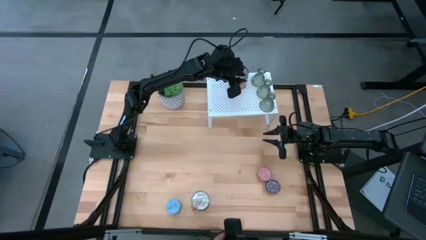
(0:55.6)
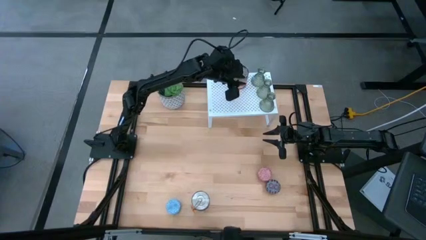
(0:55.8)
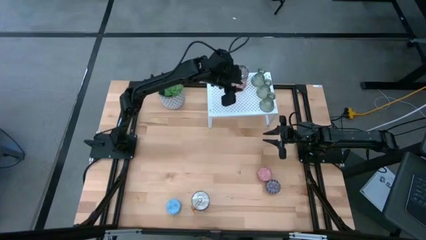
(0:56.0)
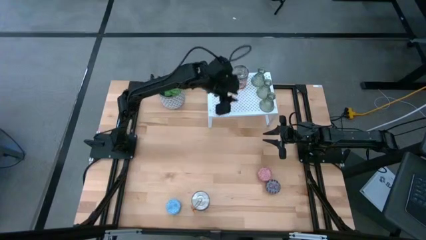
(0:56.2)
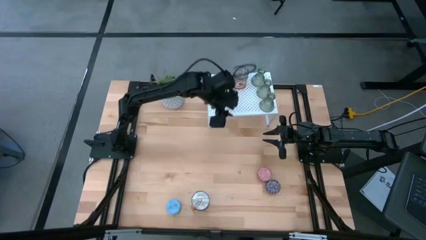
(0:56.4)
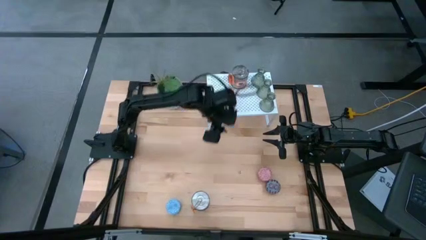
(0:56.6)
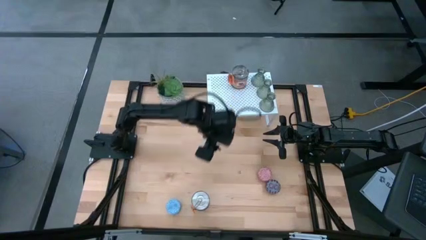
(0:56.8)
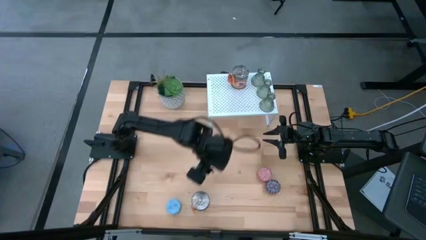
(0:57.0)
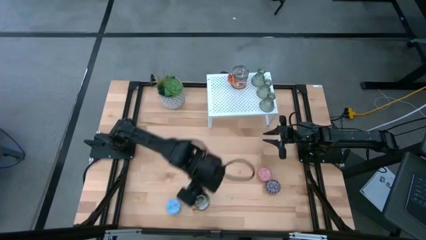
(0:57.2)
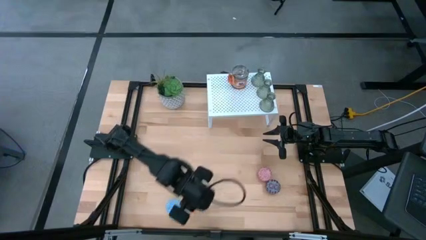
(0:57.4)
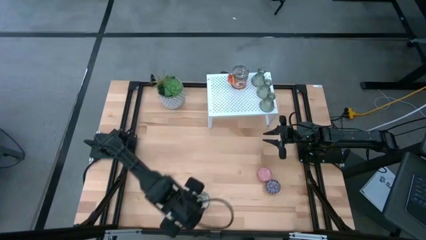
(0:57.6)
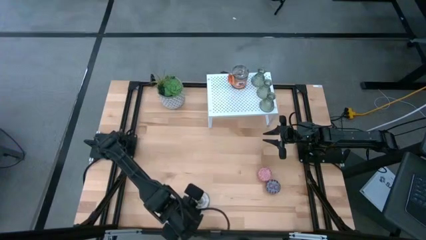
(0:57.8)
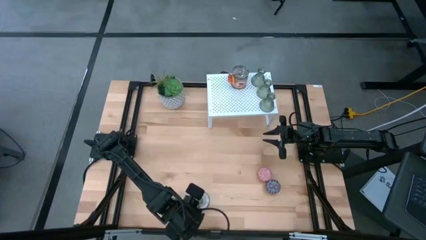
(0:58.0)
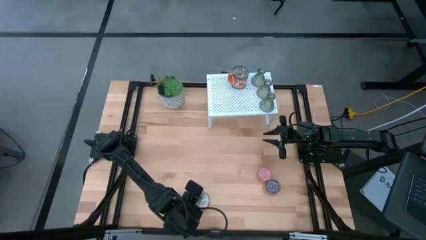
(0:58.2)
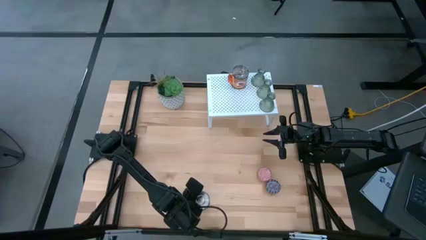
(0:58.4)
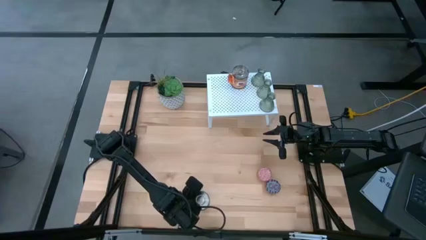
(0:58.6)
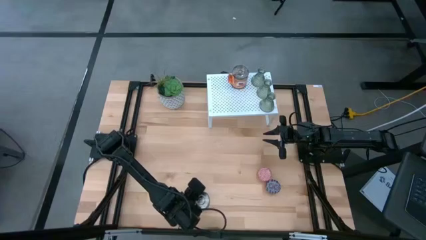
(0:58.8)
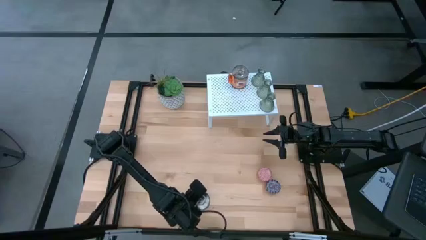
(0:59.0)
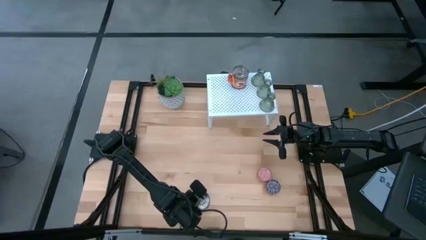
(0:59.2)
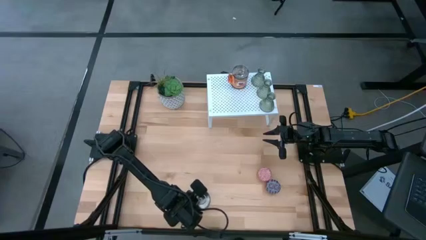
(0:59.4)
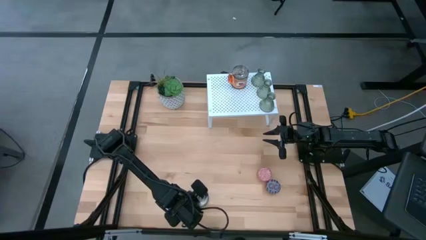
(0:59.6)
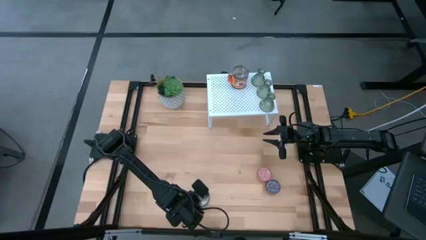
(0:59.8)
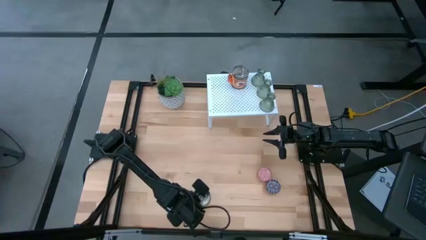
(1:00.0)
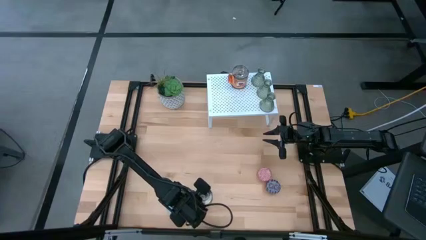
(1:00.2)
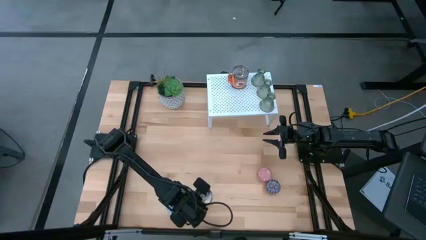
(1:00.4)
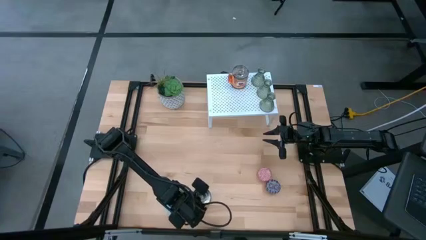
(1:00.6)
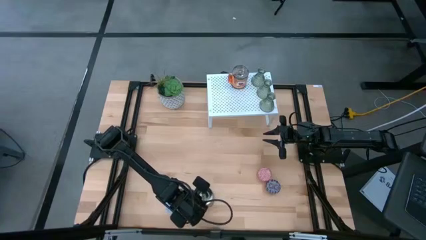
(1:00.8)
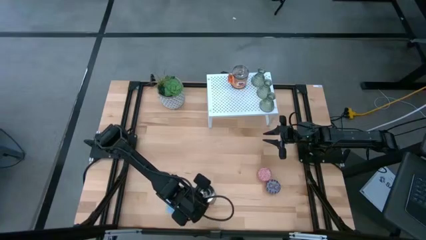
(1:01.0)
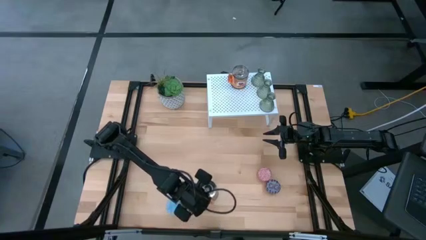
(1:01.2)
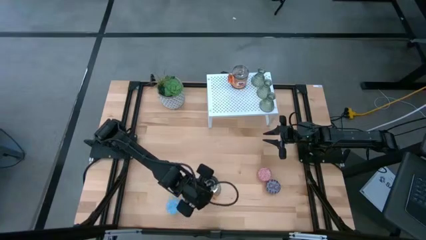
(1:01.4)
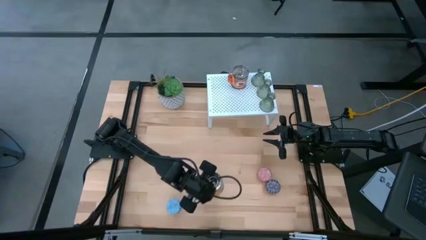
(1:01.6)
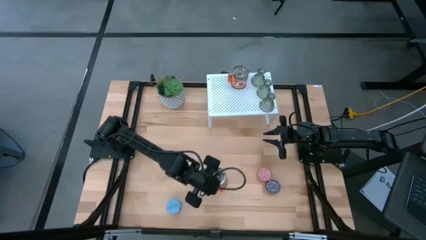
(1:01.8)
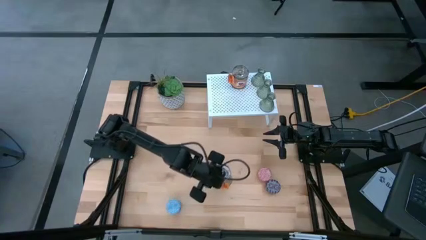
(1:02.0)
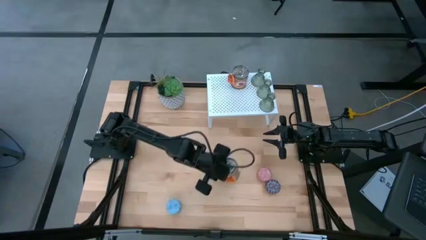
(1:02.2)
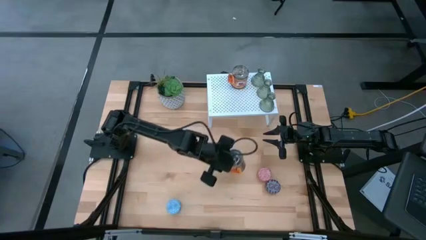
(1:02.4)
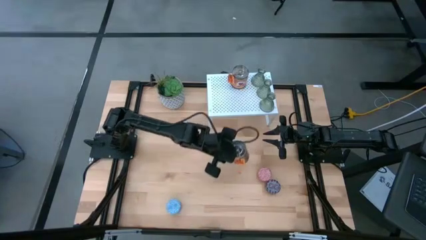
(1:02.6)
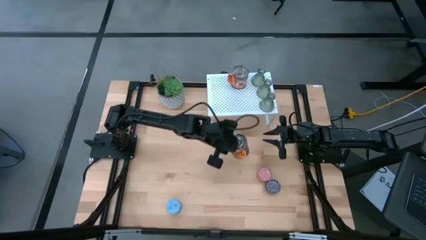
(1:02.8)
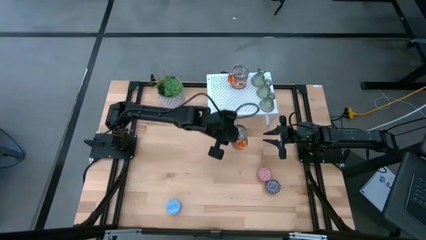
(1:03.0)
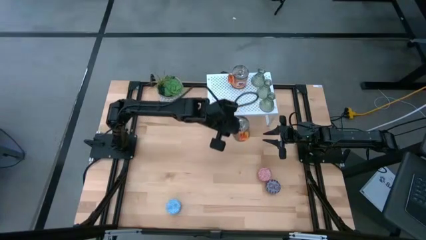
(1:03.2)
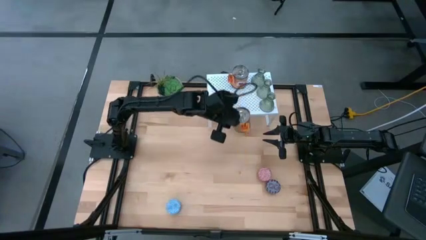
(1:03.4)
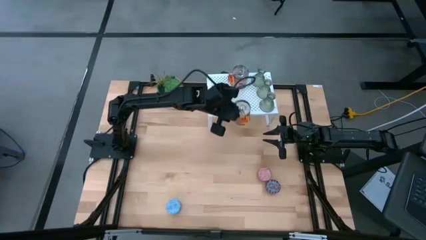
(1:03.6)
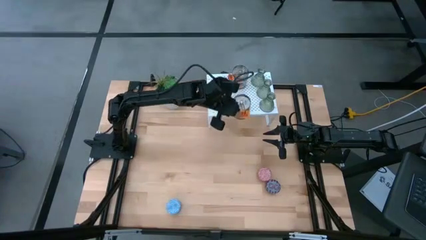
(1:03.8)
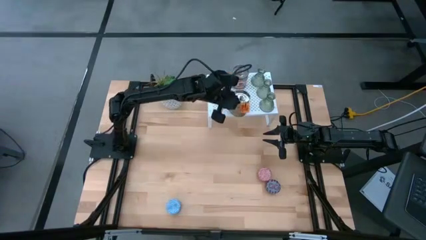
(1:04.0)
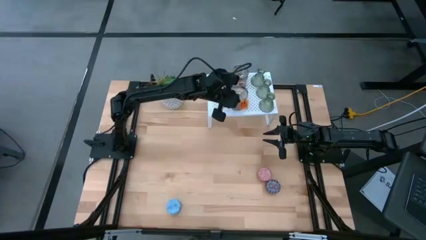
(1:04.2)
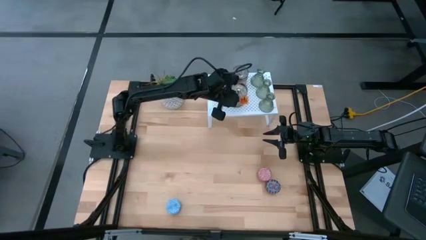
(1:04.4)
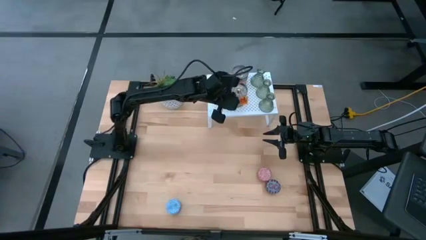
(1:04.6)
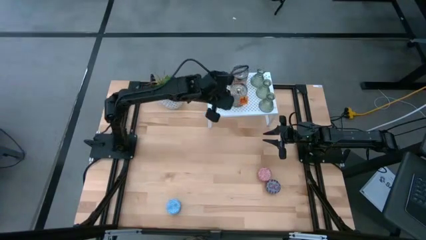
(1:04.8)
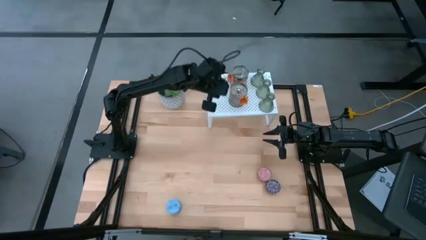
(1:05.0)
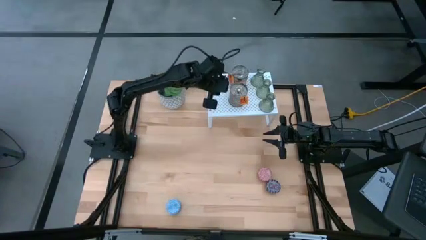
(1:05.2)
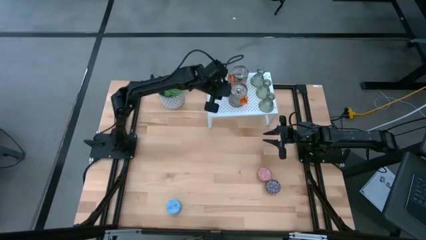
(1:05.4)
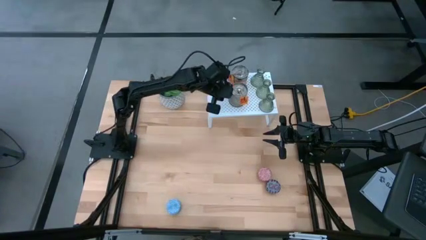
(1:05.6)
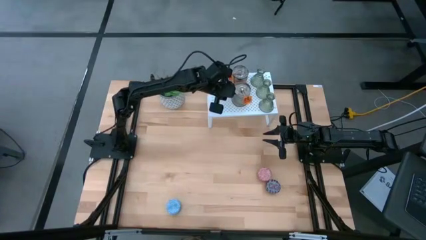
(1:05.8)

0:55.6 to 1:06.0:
Task: Pick & Place candle stick holders
Put the silver scented candle on the shelf aligned with the other silver scented candle

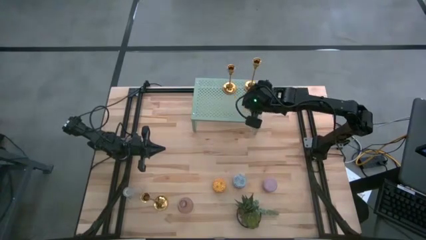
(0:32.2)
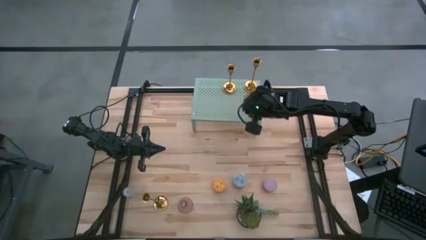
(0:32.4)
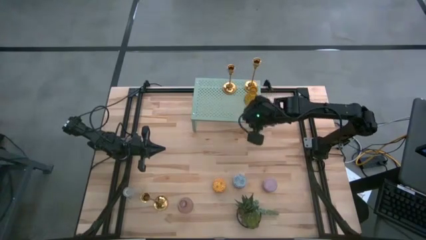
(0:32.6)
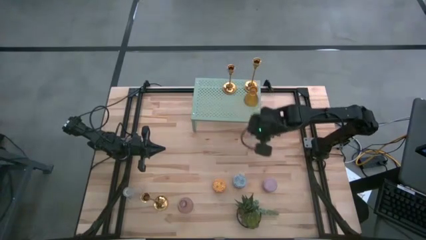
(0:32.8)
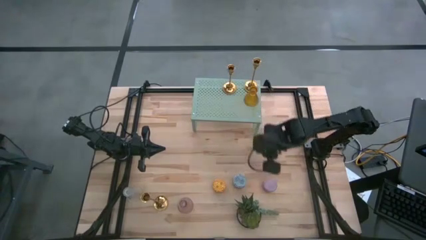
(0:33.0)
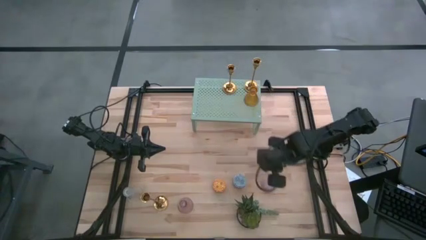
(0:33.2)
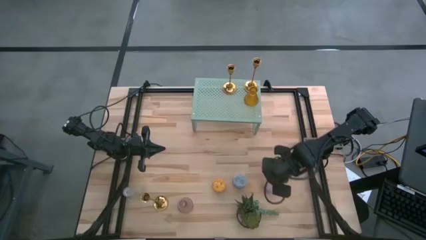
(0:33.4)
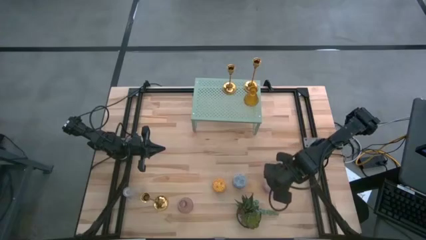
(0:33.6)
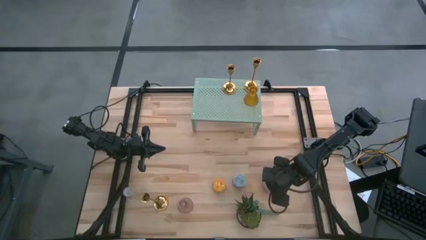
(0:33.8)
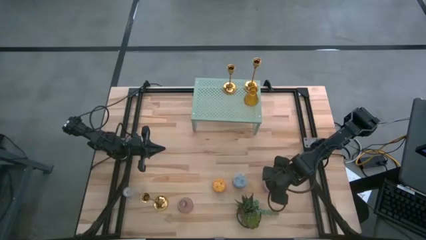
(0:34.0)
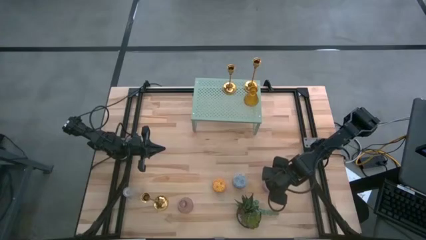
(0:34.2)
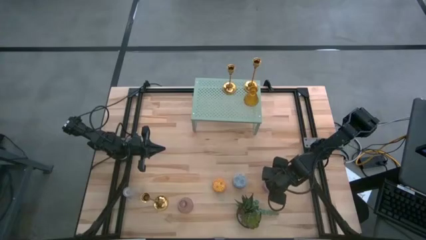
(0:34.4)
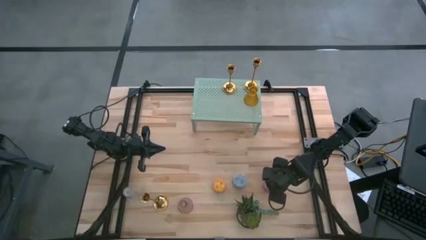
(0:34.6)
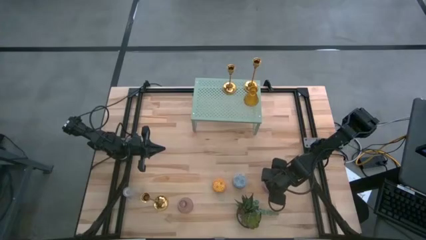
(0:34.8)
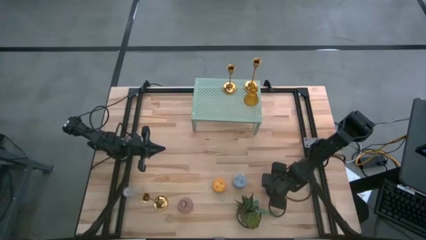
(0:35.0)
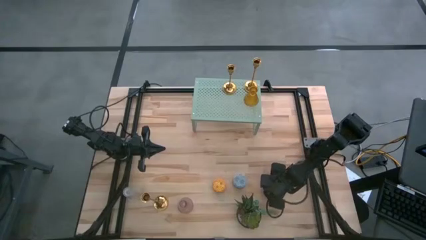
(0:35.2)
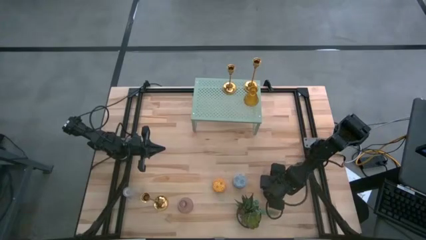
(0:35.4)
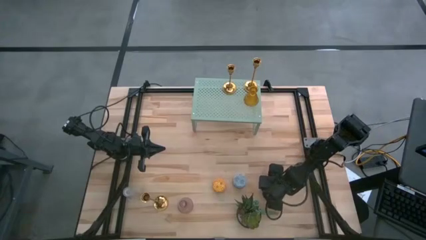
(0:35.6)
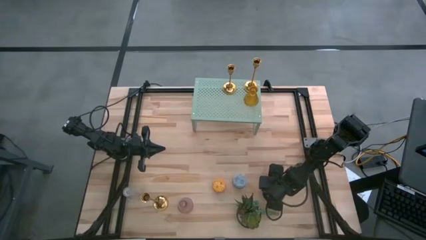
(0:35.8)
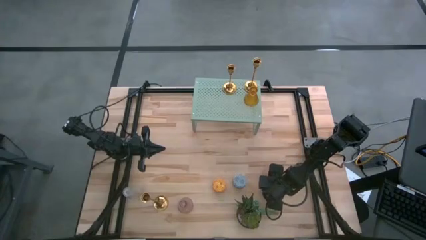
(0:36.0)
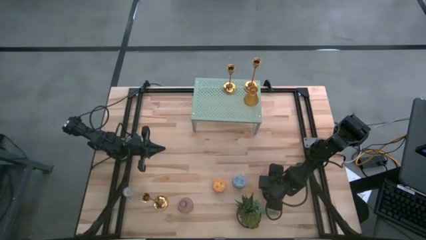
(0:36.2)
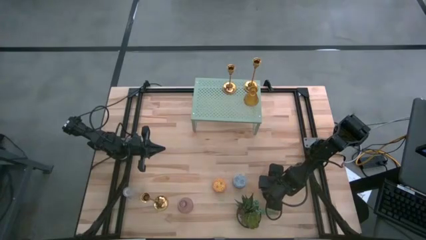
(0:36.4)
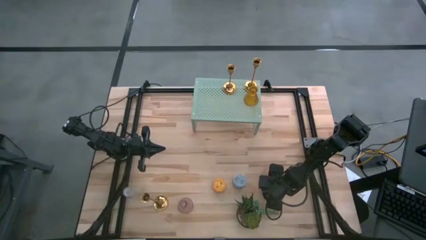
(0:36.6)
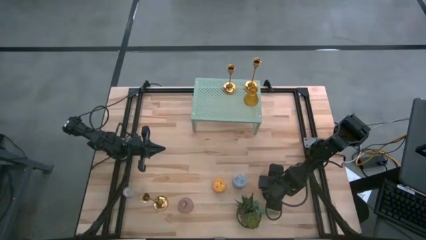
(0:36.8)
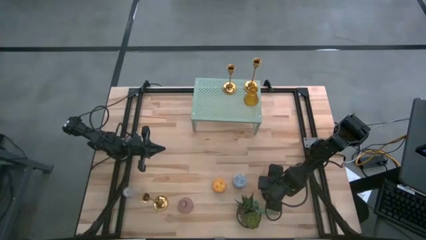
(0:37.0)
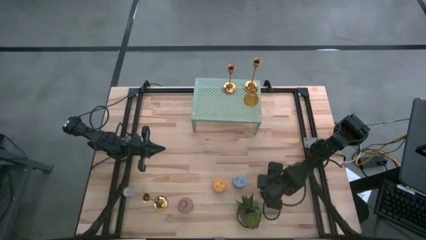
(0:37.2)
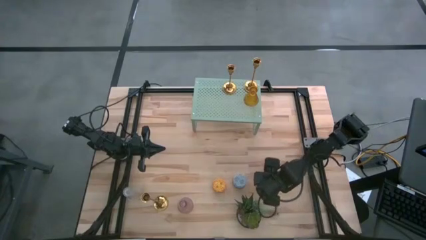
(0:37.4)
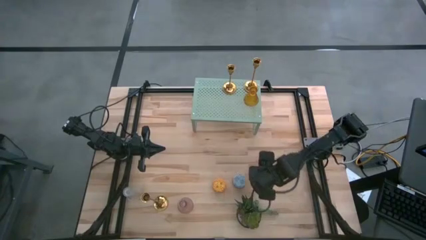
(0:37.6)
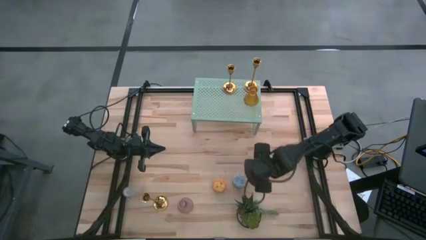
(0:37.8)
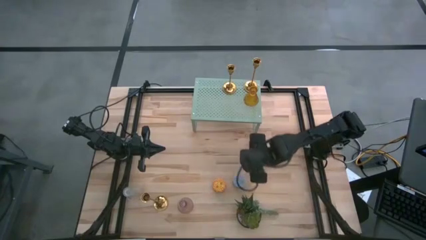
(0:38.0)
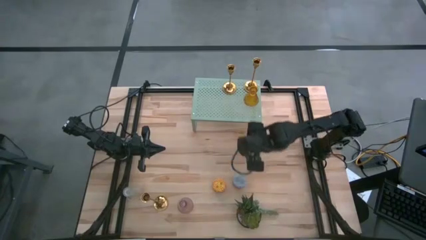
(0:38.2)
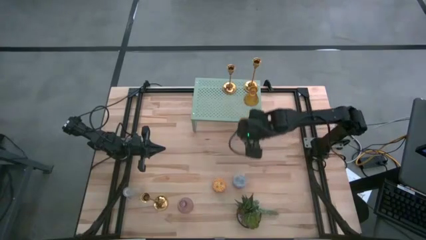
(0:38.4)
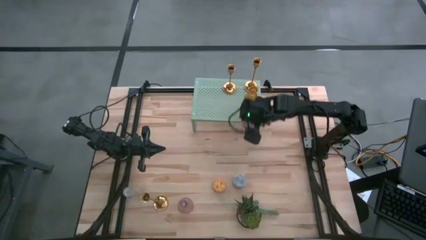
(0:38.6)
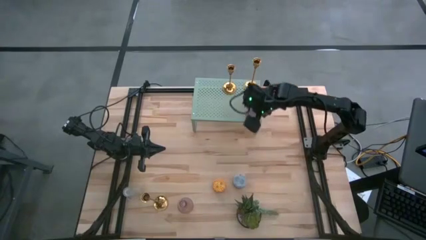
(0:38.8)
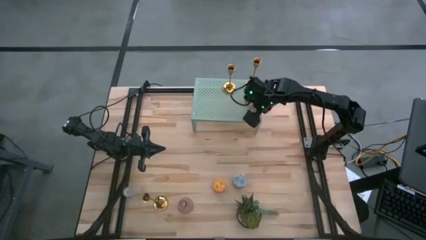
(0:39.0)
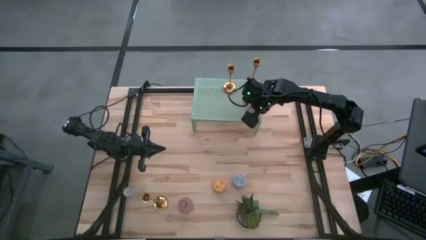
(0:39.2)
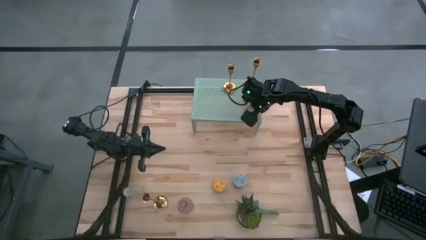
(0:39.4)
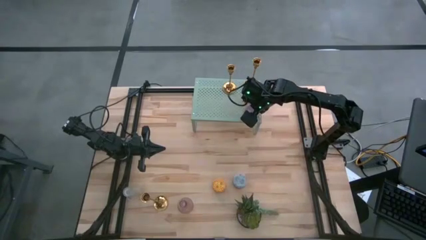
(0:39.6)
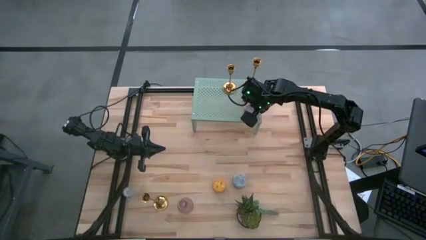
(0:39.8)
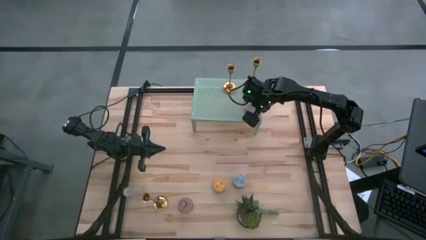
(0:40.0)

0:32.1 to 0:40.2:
Task: Pick & Place candle stick holders
Put the purple scented candle on the shelf
